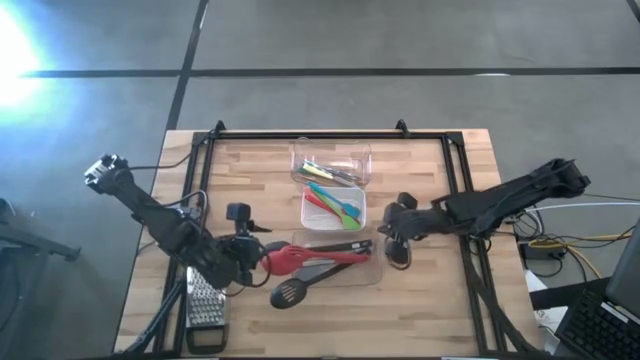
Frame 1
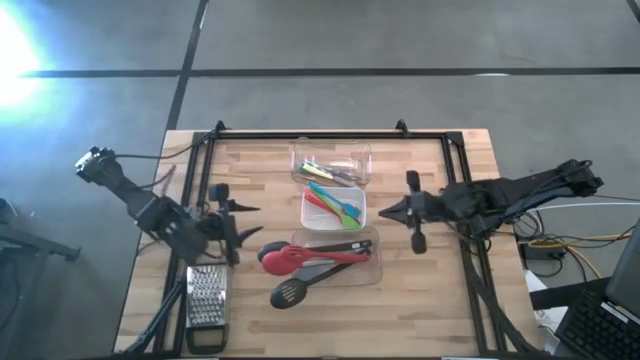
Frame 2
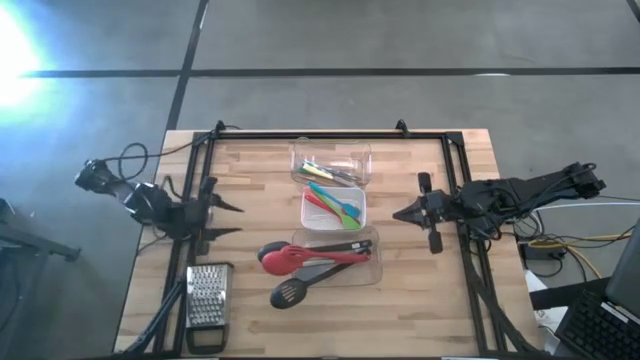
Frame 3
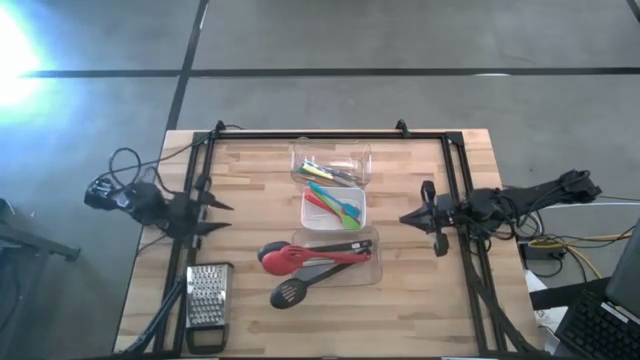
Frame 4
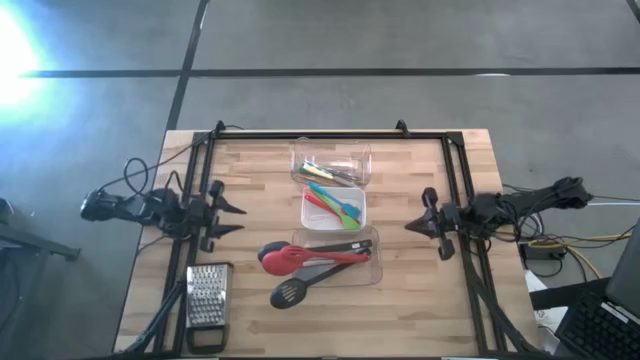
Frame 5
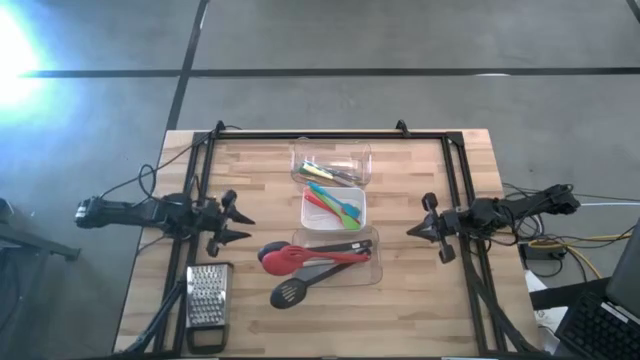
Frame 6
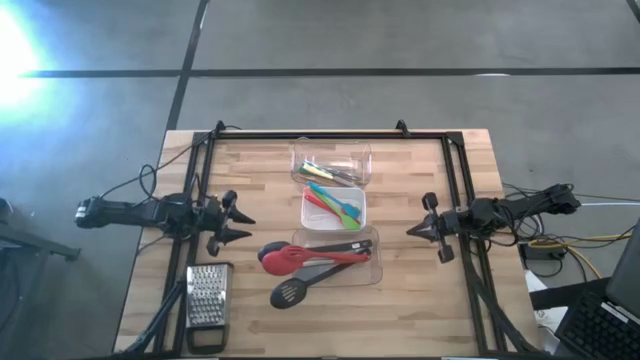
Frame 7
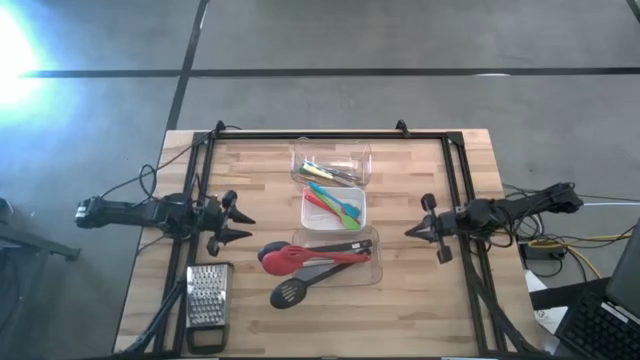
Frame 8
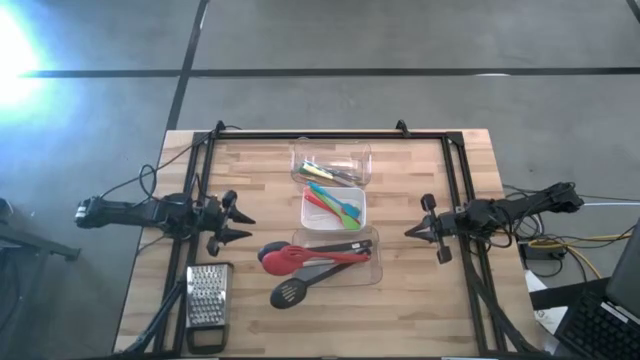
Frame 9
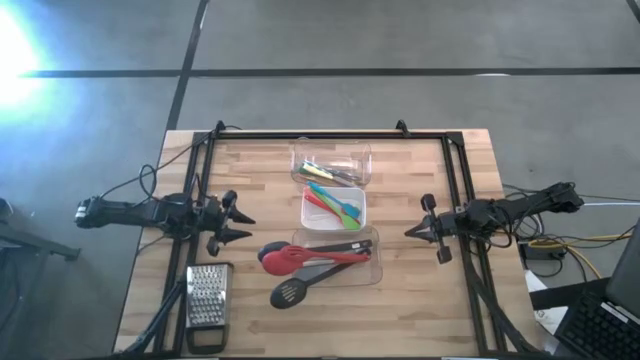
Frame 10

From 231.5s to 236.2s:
Task: Pick & Place Kitchen Items
Return to Home Position

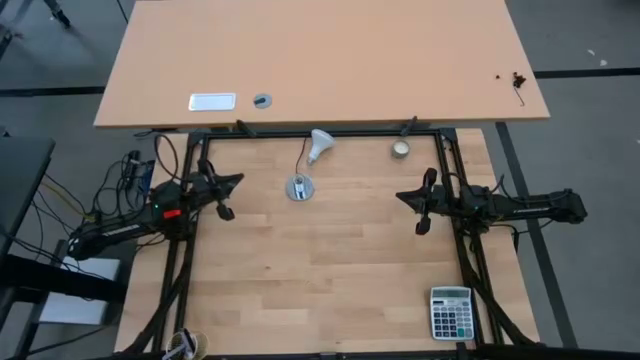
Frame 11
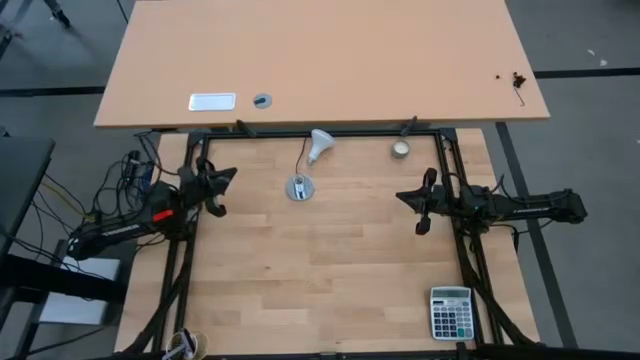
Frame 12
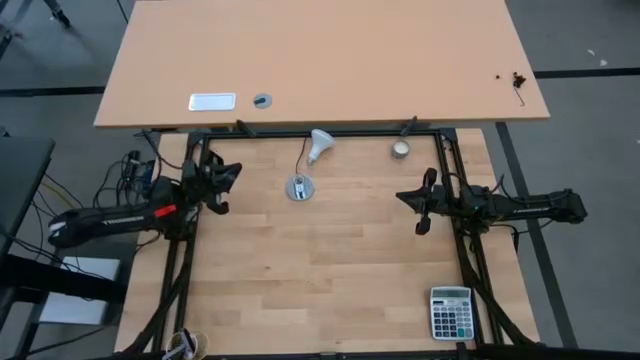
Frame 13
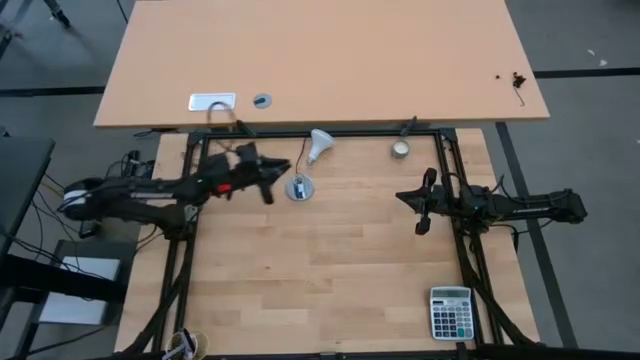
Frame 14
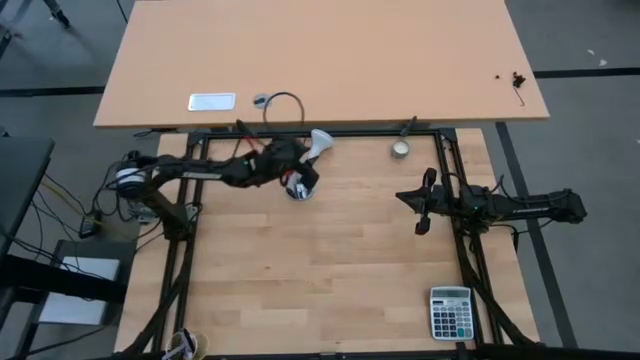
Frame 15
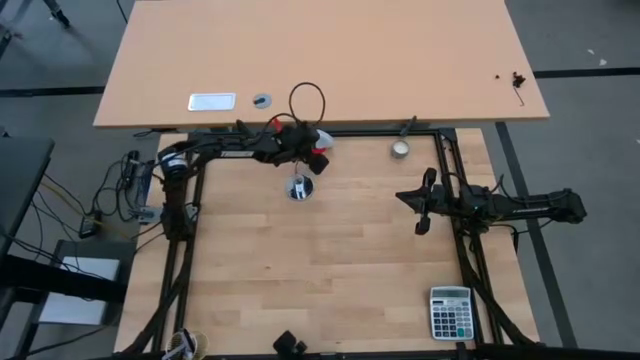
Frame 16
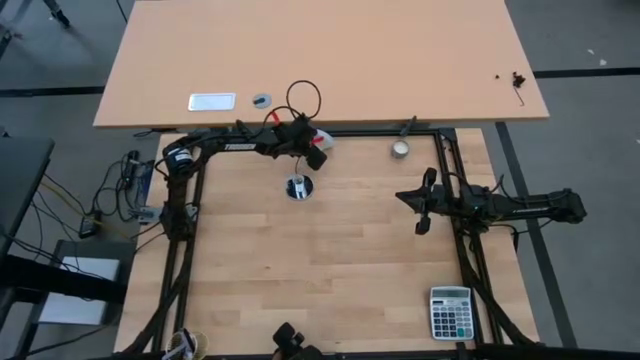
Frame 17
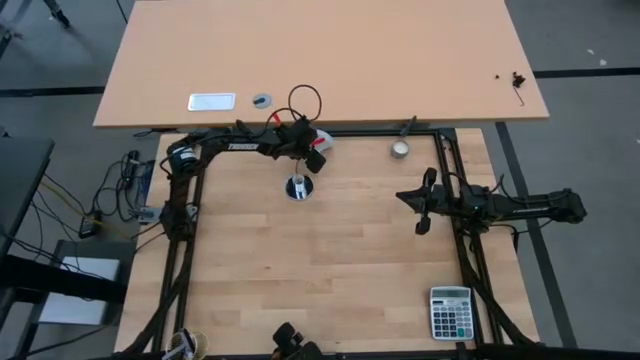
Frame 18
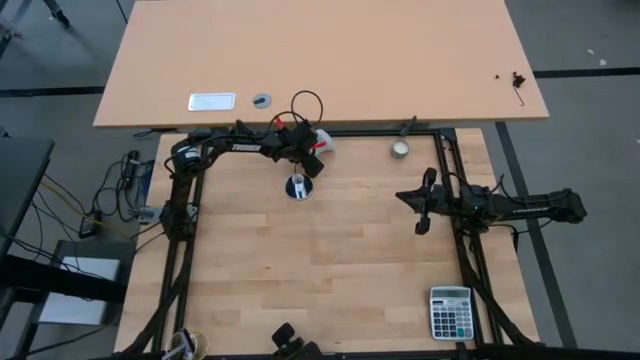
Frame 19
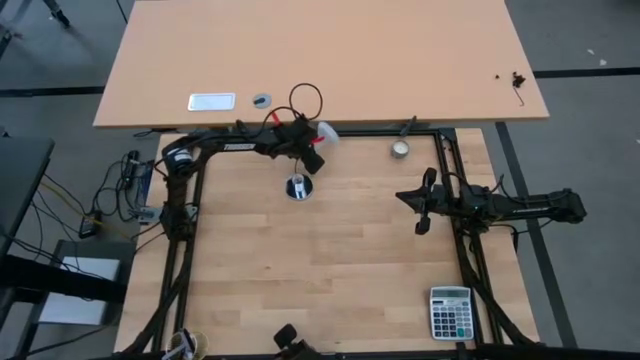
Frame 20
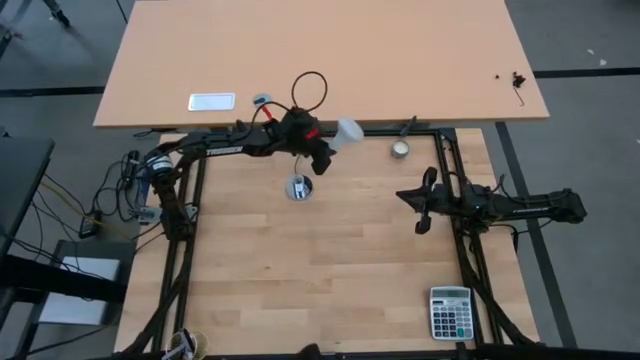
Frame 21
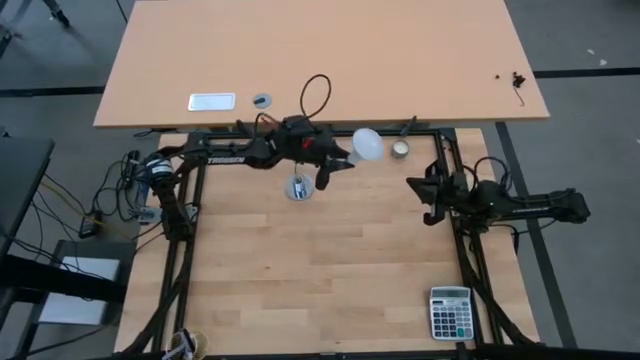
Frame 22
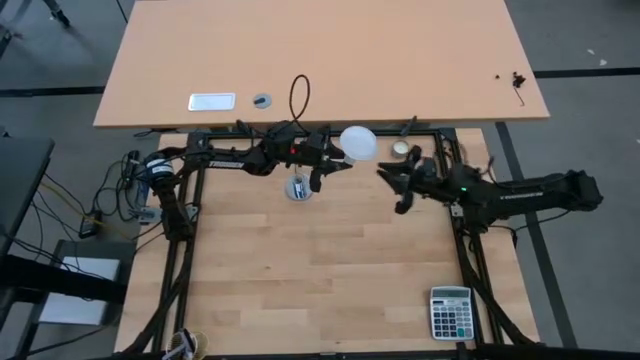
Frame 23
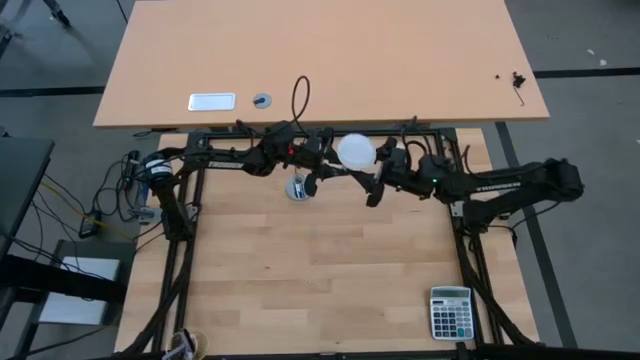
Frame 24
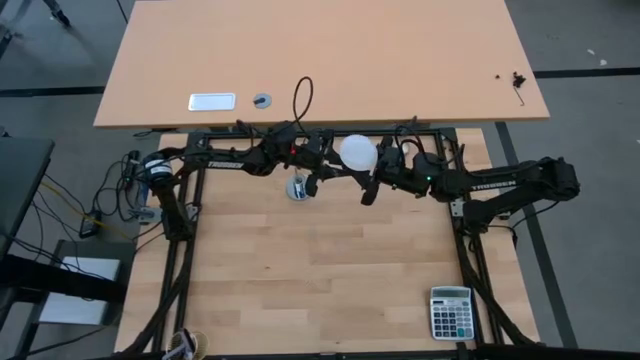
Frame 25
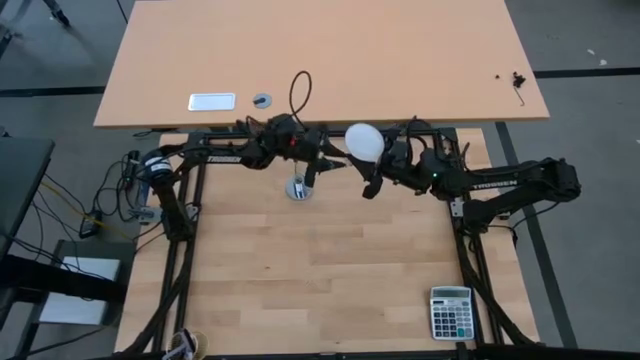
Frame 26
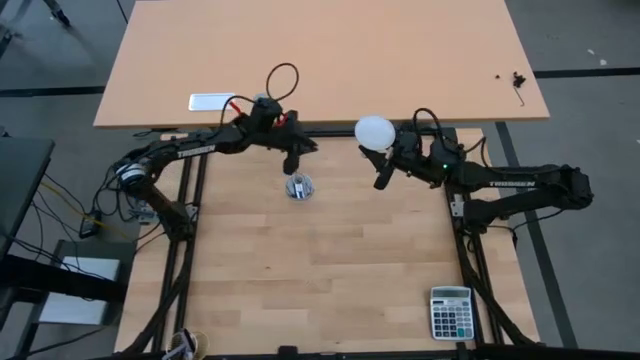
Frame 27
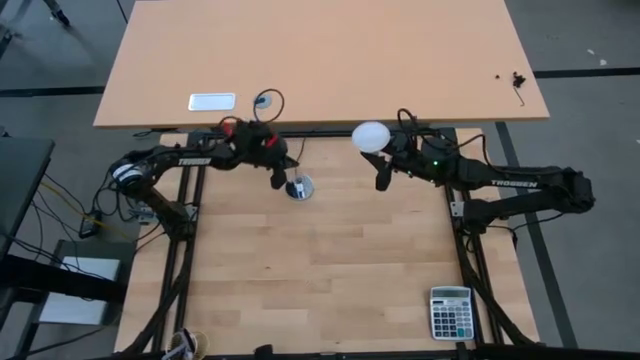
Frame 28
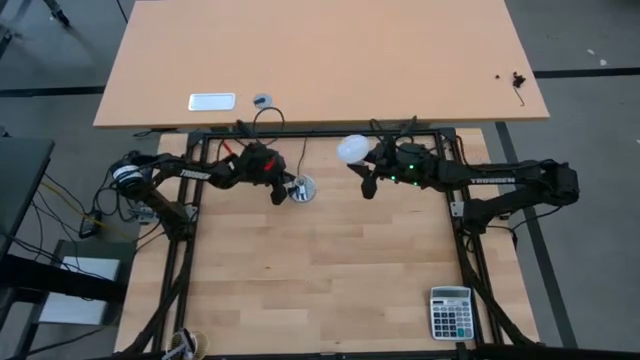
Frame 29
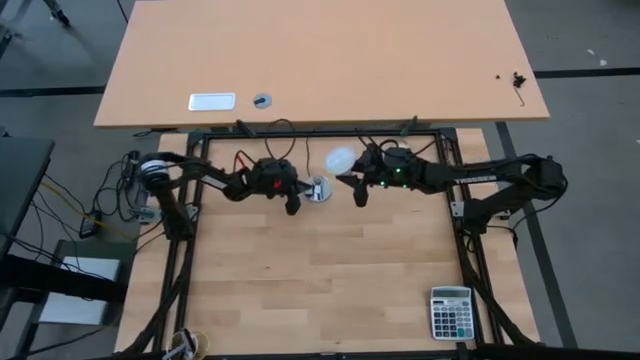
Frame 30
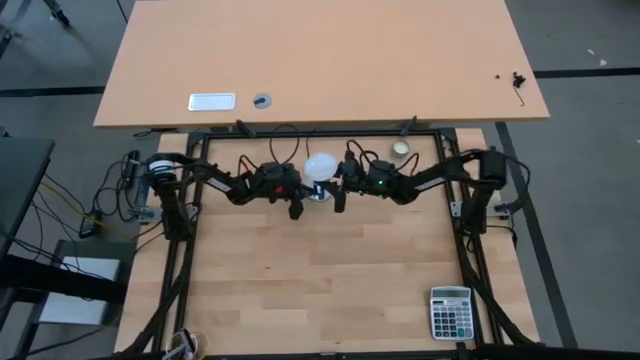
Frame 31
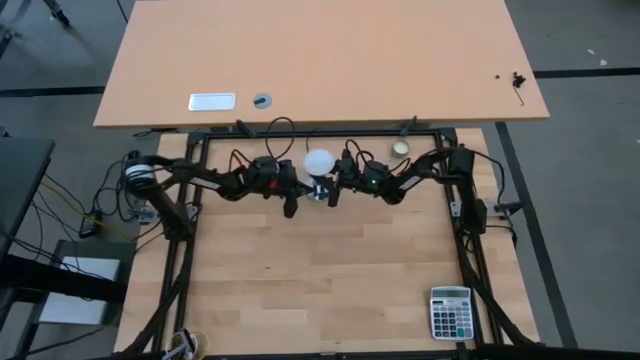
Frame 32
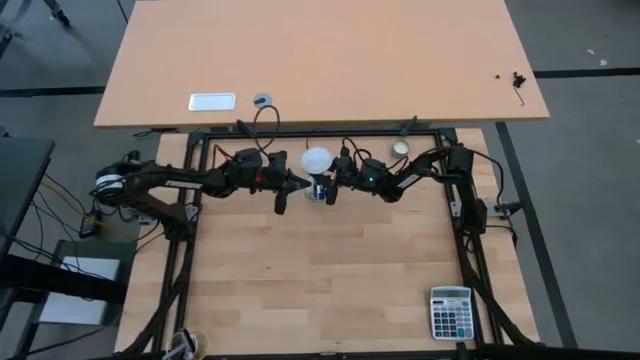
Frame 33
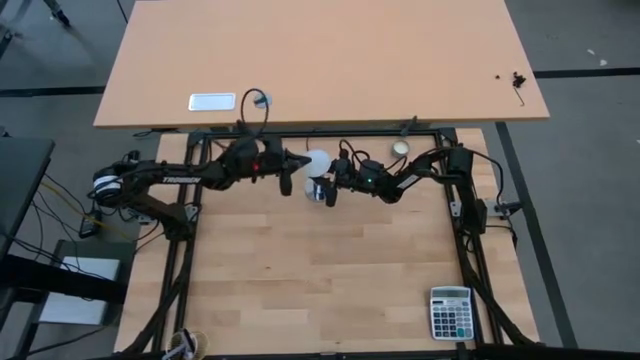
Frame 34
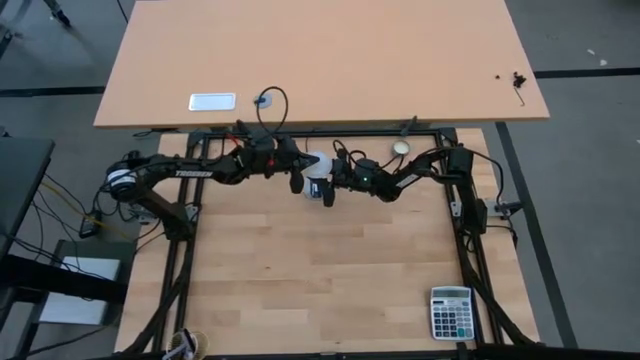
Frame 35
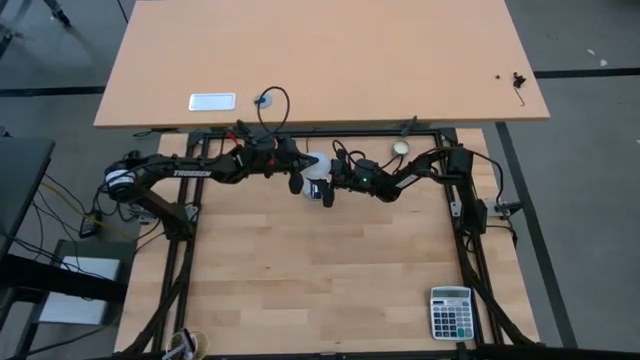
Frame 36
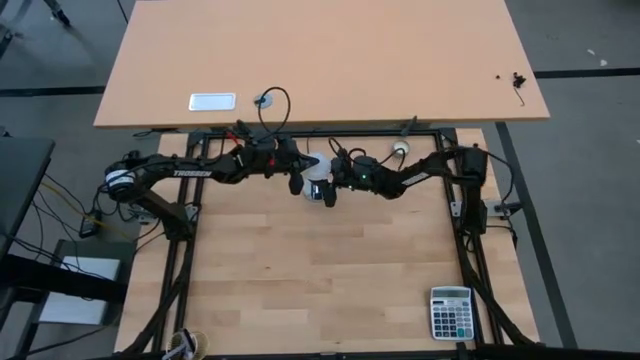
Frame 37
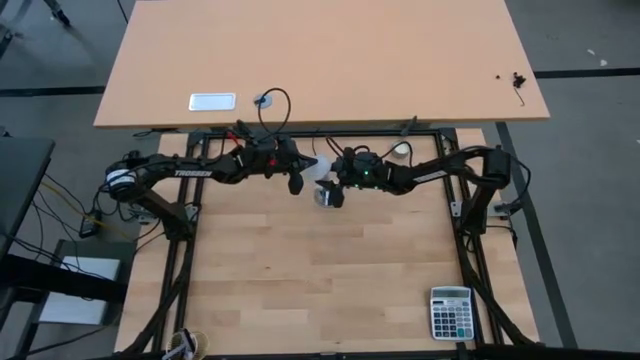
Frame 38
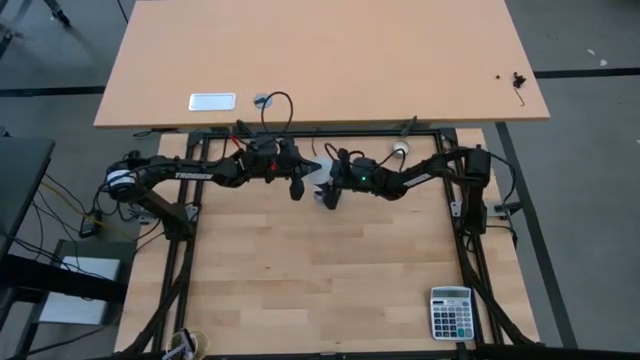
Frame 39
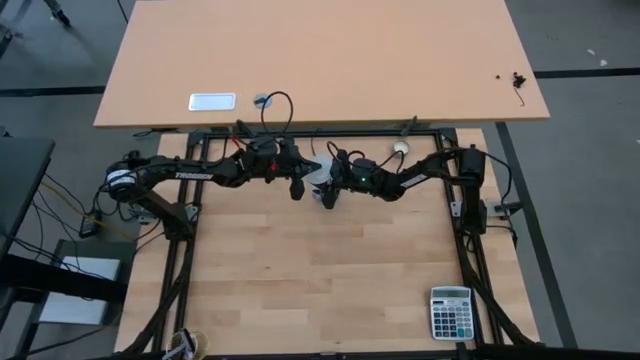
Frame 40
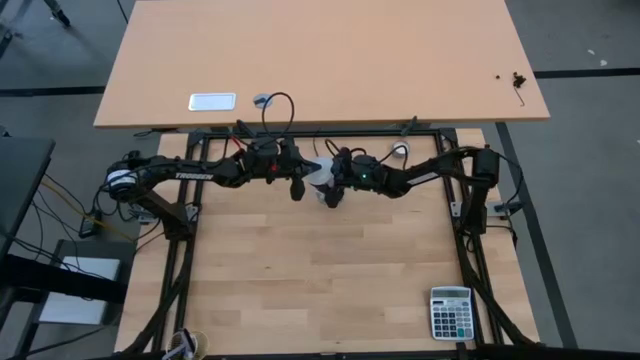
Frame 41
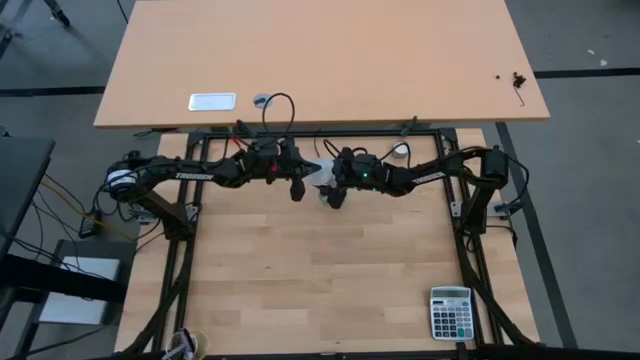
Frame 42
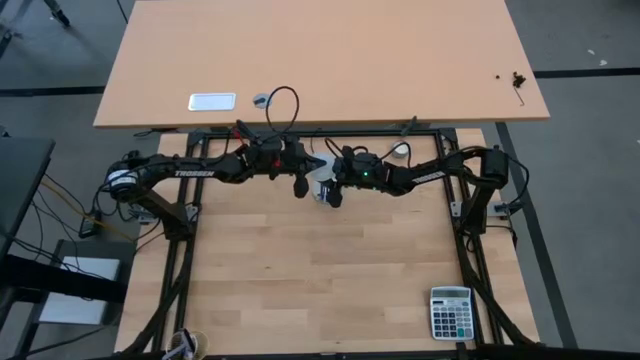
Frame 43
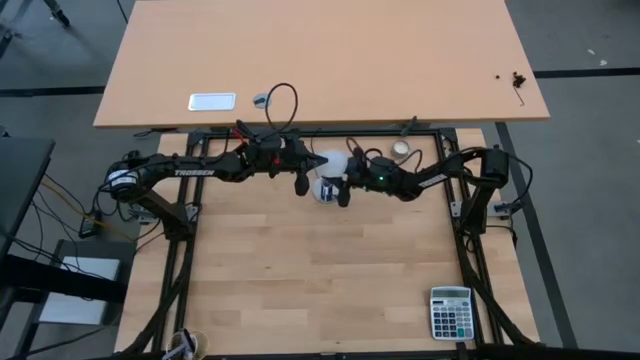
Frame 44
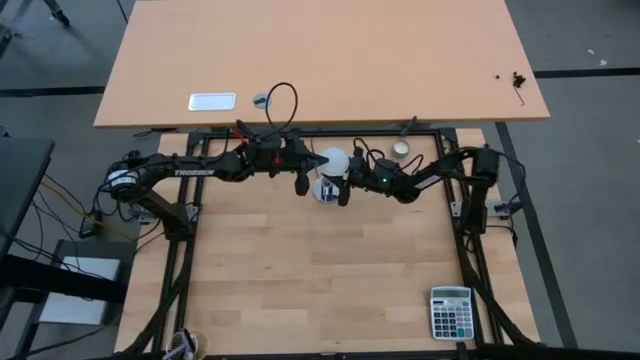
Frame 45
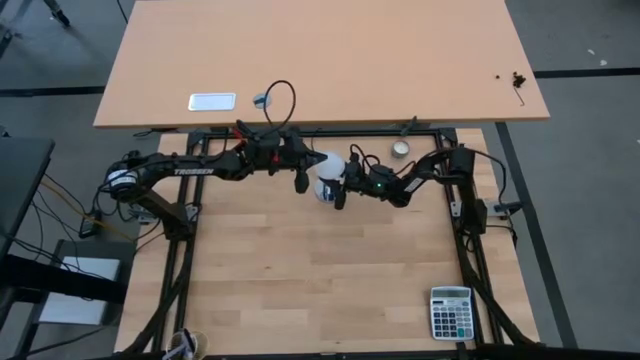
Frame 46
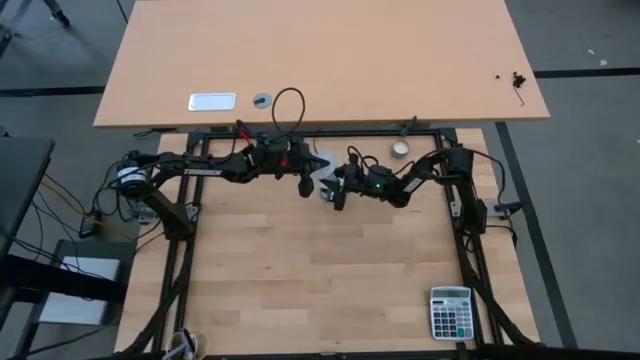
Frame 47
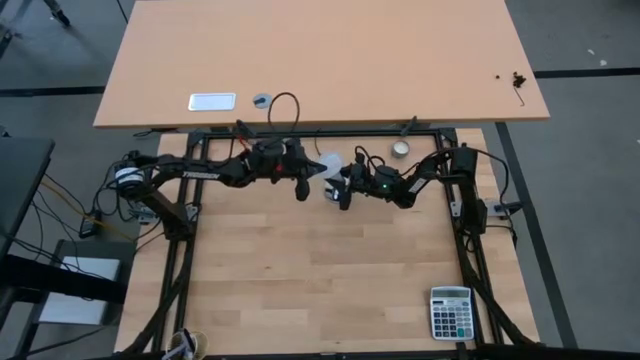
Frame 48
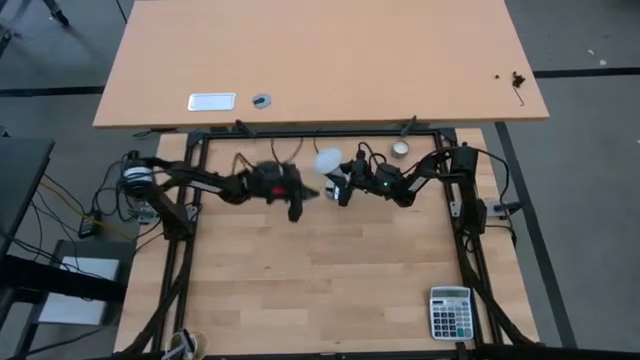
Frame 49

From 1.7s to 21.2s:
Task: Screw lightbulb
Insert the light into the lamp socket
